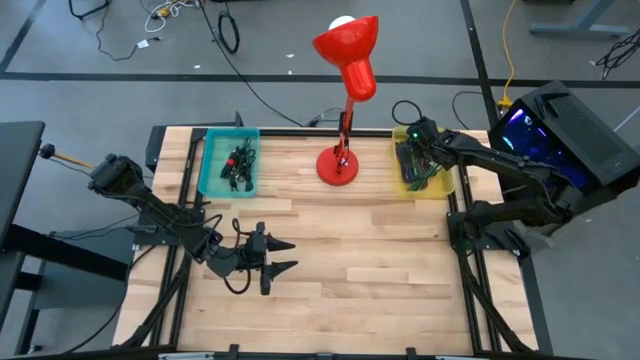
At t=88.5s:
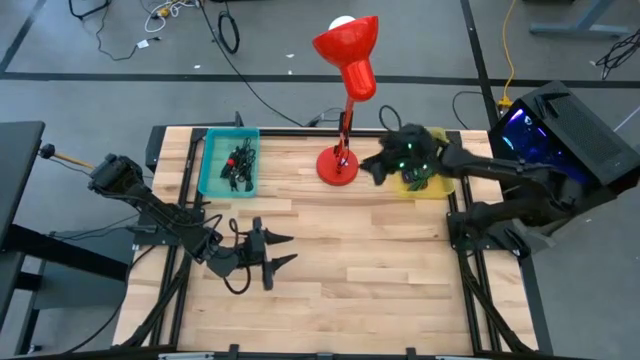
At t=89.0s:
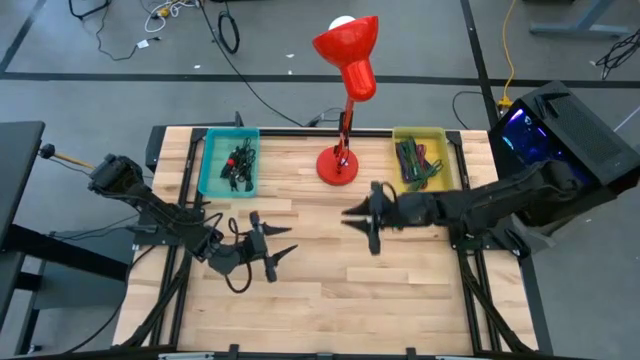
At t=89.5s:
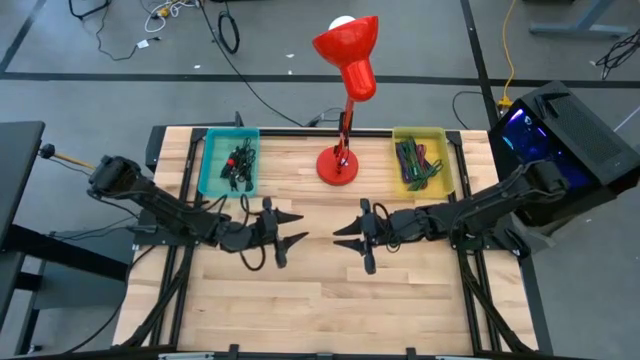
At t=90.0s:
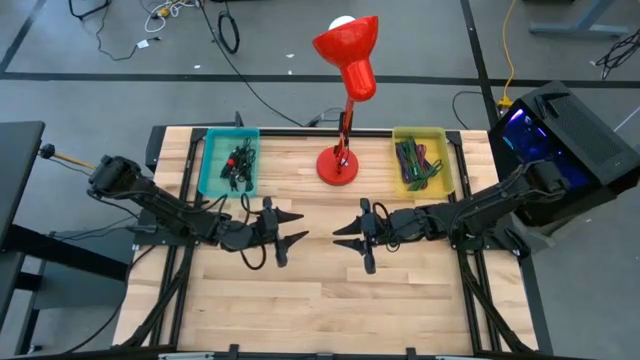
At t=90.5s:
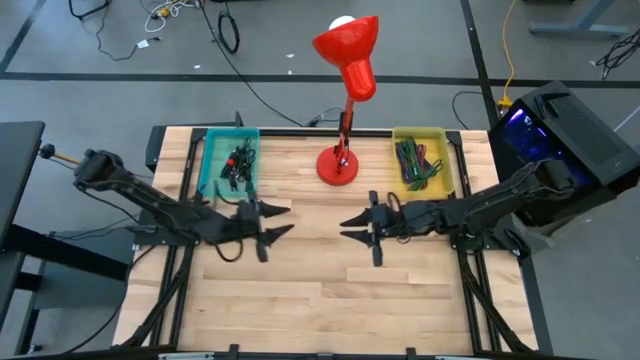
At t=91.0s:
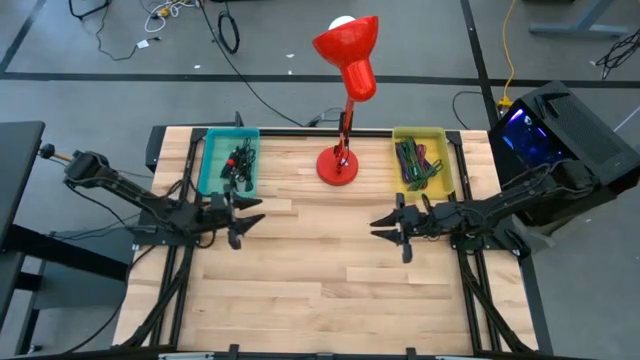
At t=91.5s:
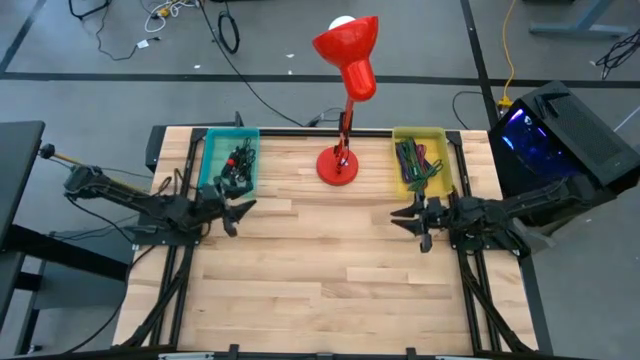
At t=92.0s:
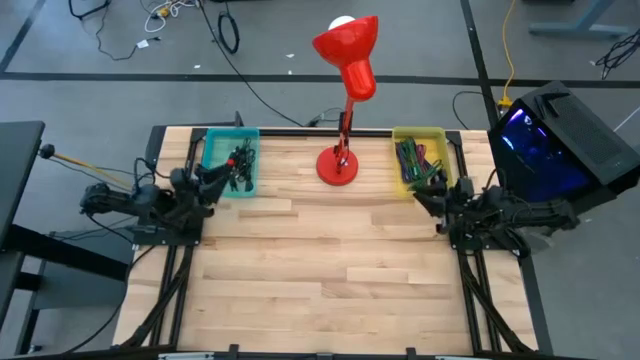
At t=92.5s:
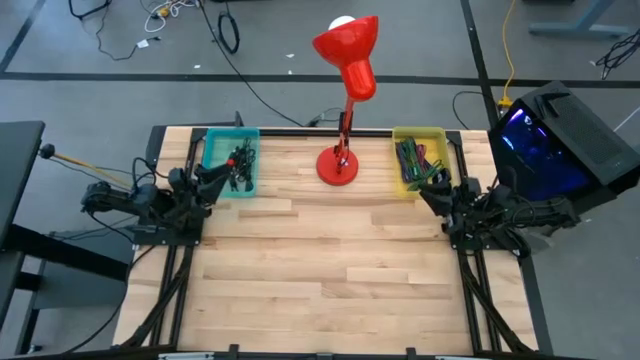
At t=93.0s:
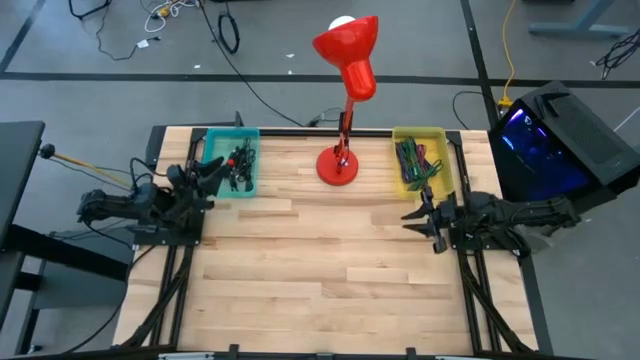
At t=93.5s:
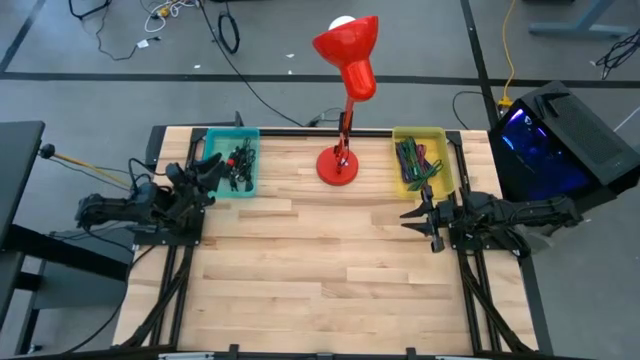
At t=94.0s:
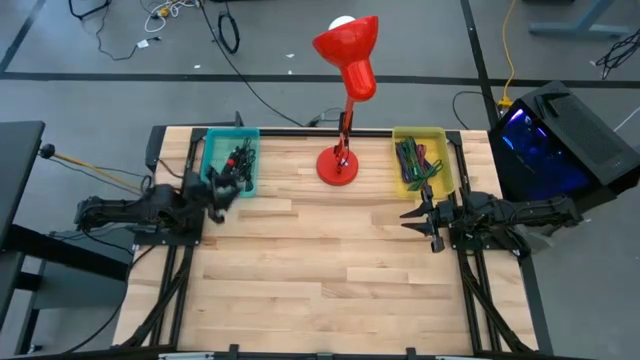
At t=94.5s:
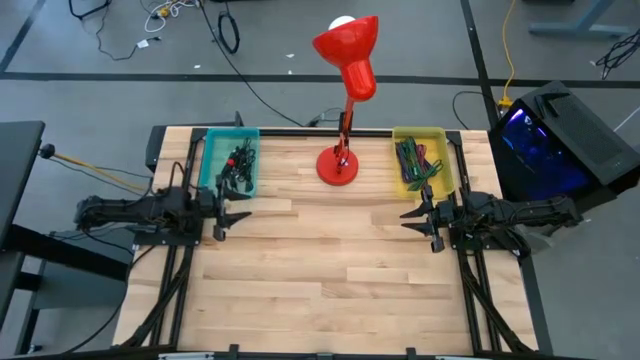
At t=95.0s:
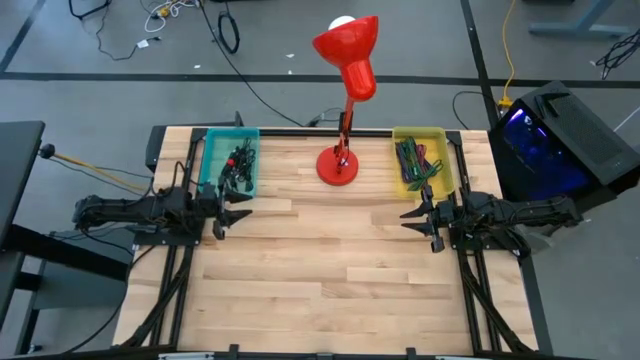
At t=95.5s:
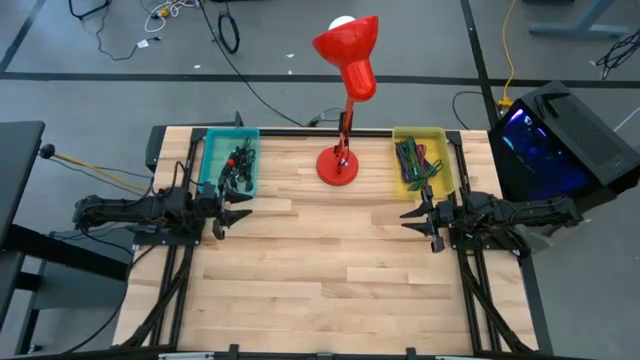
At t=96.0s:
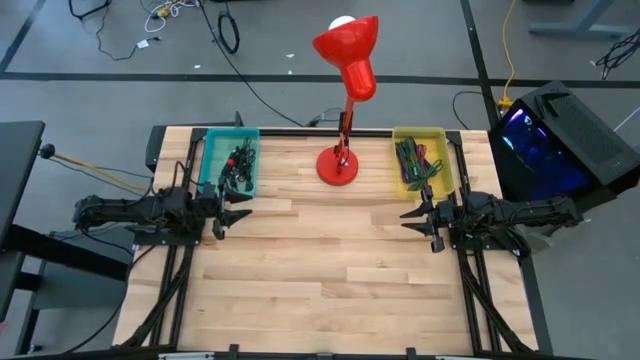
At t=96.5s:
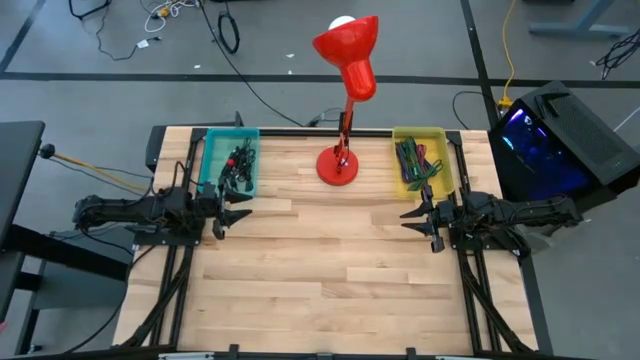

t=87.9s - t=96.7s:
Task: Pick & Place USB Port
Return to Home Position

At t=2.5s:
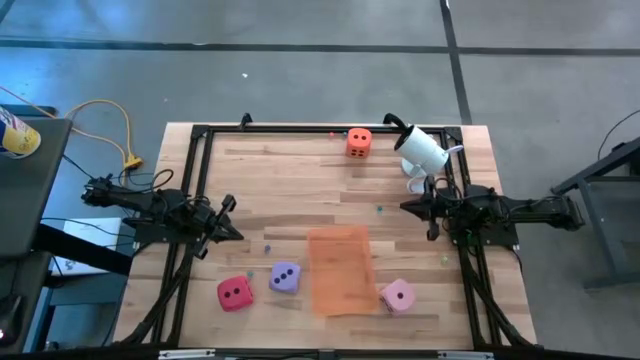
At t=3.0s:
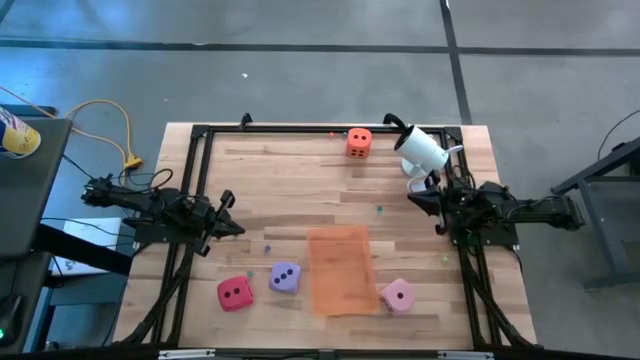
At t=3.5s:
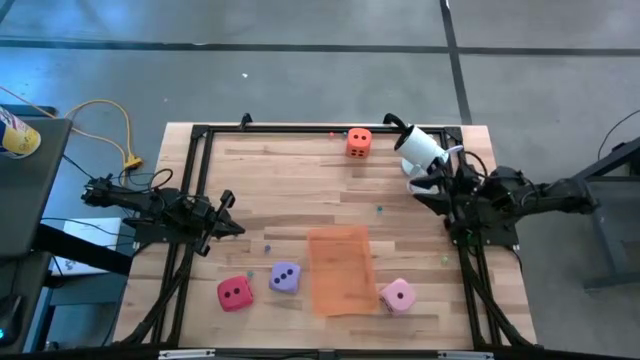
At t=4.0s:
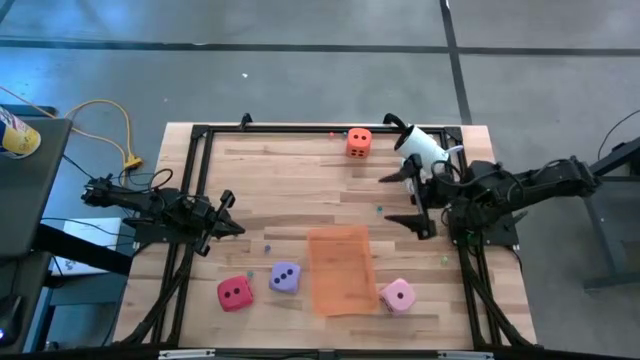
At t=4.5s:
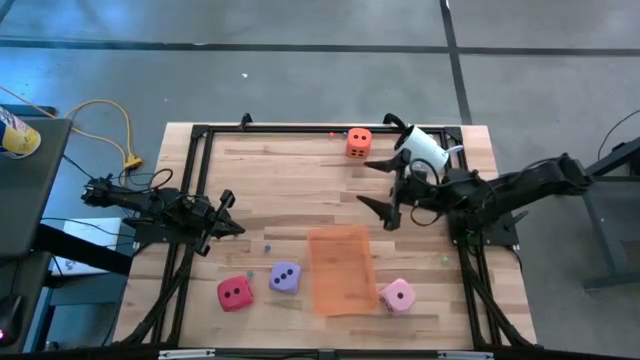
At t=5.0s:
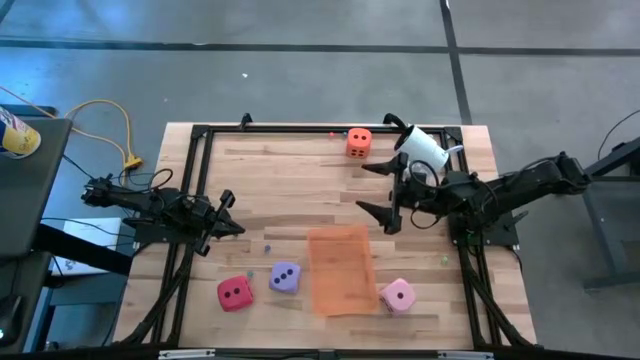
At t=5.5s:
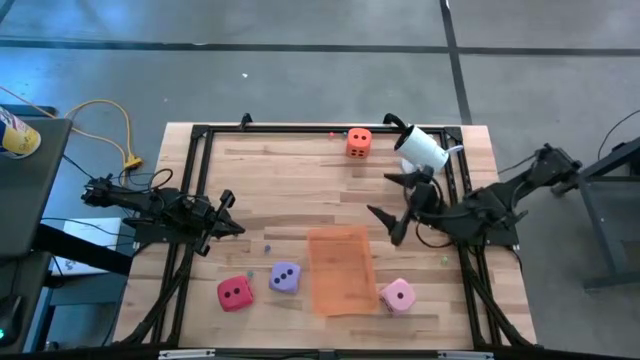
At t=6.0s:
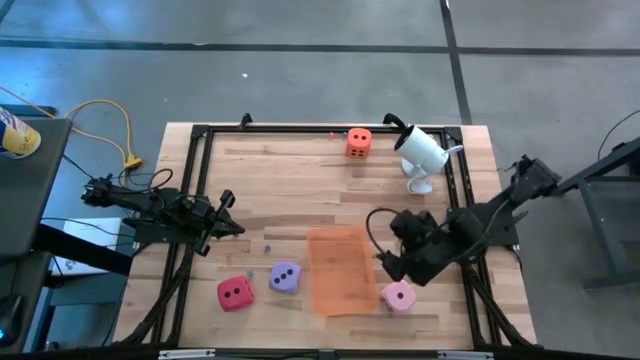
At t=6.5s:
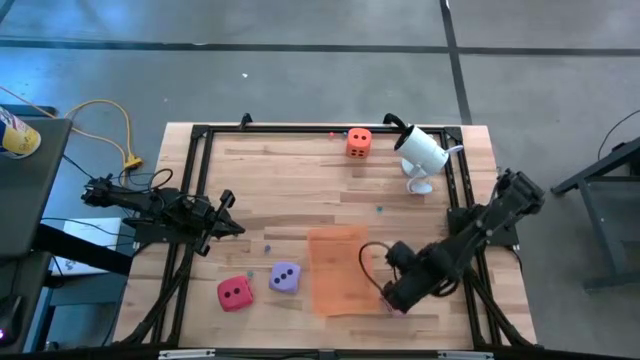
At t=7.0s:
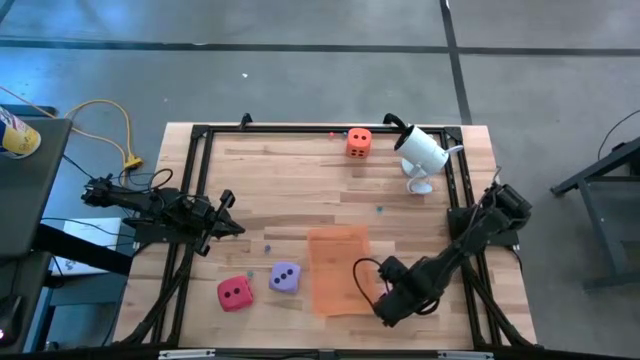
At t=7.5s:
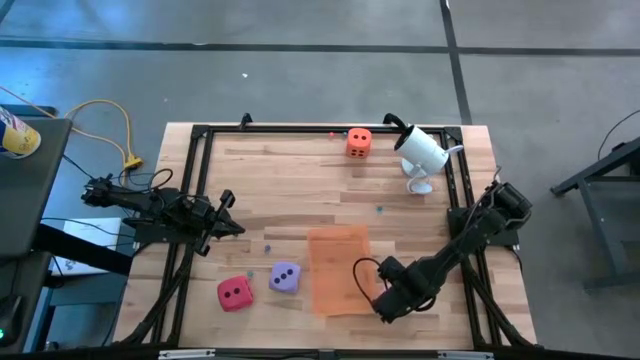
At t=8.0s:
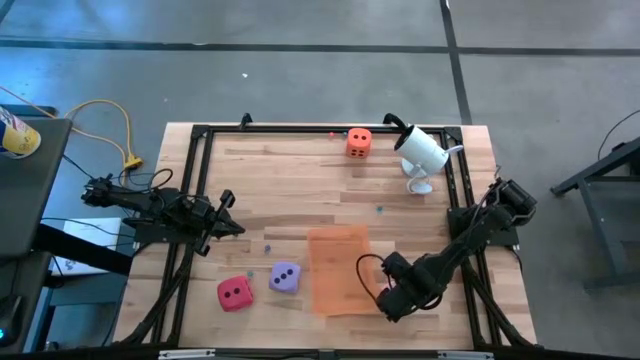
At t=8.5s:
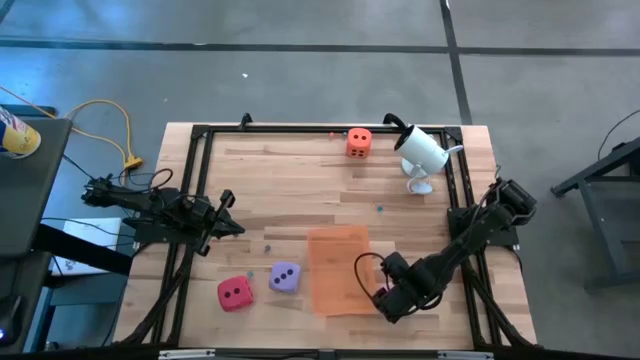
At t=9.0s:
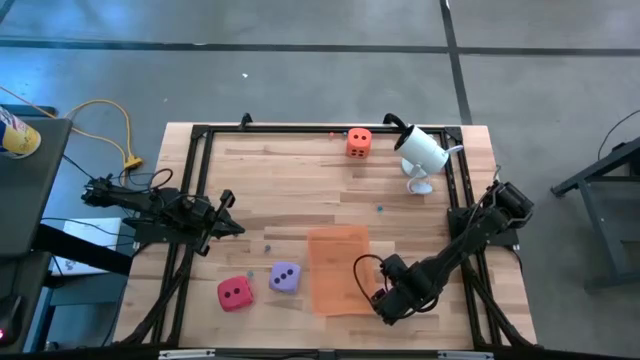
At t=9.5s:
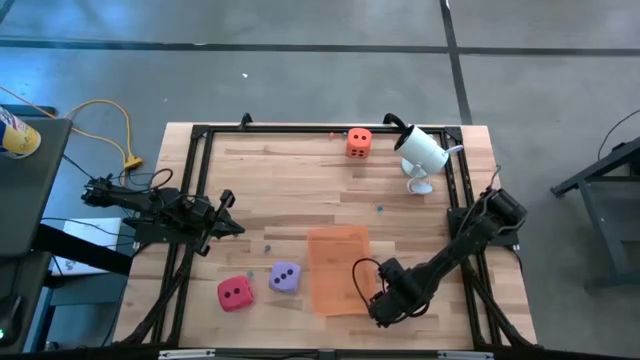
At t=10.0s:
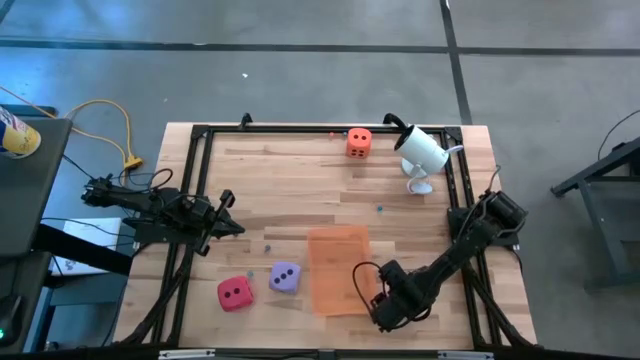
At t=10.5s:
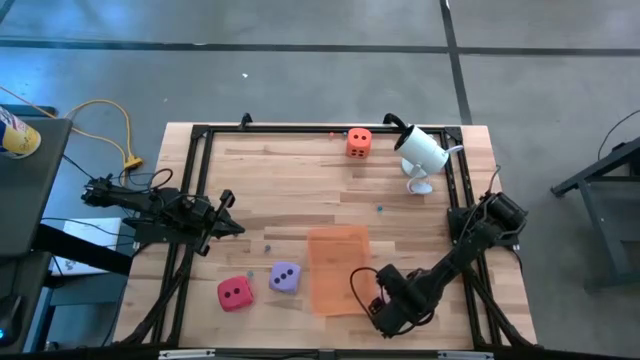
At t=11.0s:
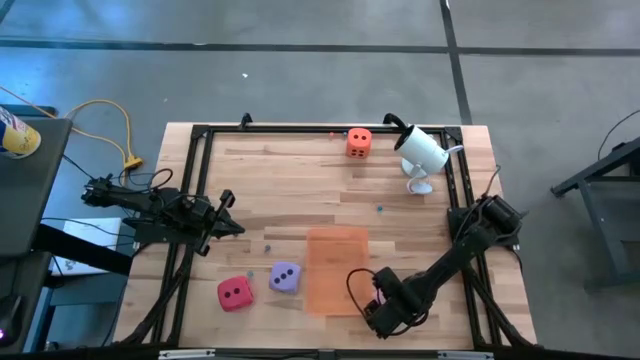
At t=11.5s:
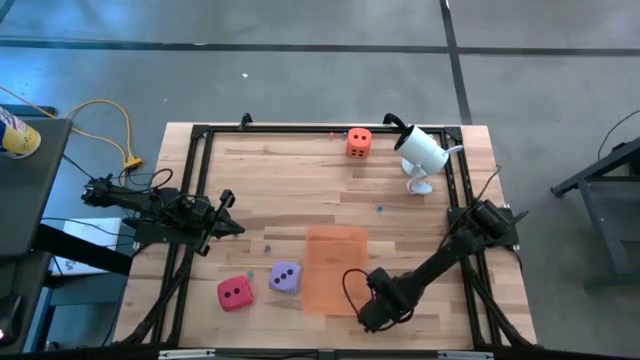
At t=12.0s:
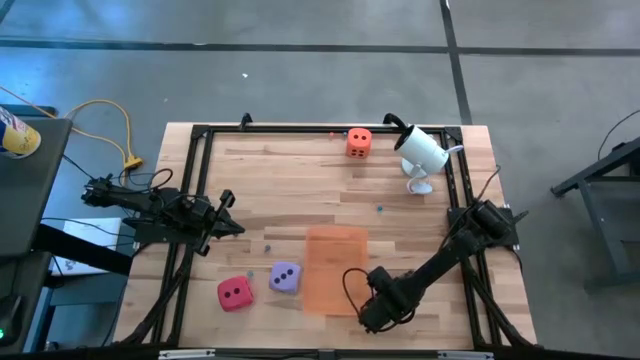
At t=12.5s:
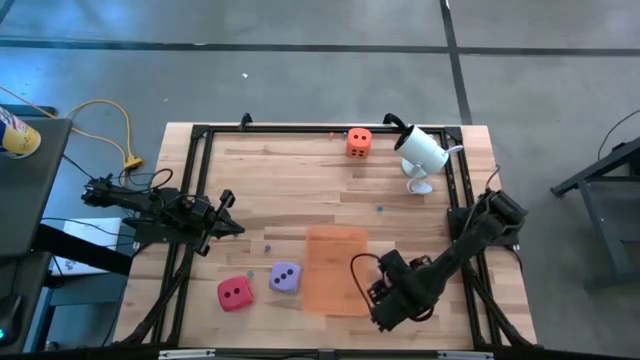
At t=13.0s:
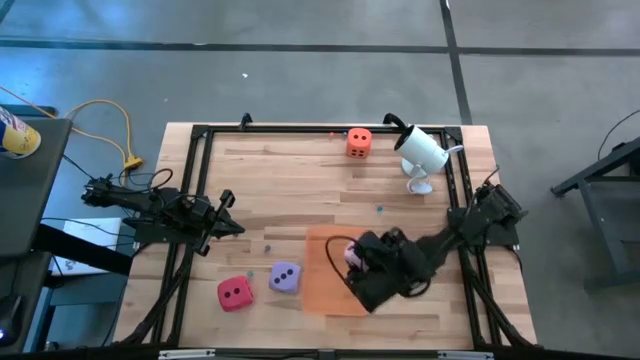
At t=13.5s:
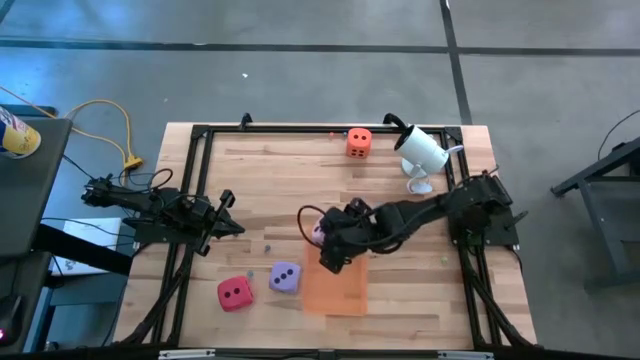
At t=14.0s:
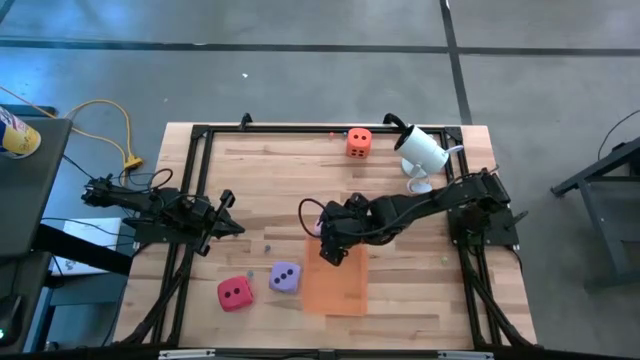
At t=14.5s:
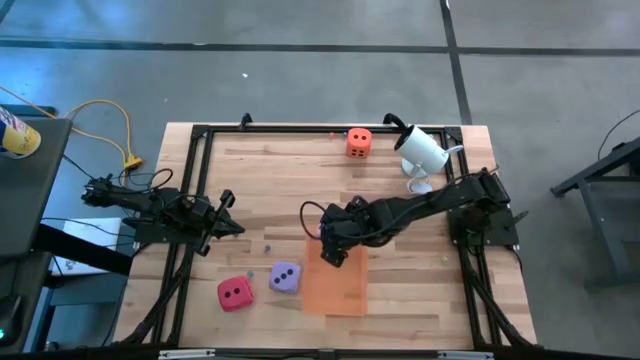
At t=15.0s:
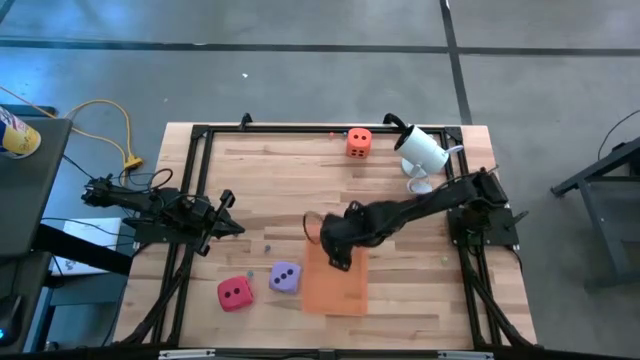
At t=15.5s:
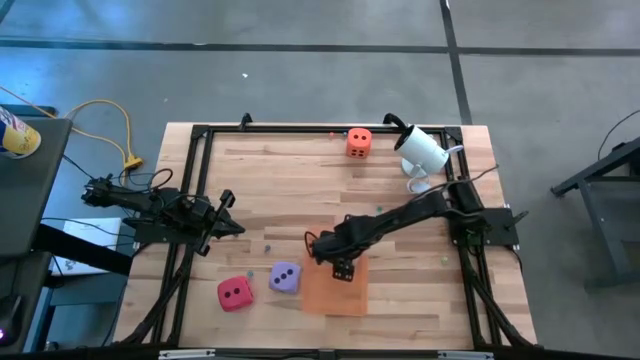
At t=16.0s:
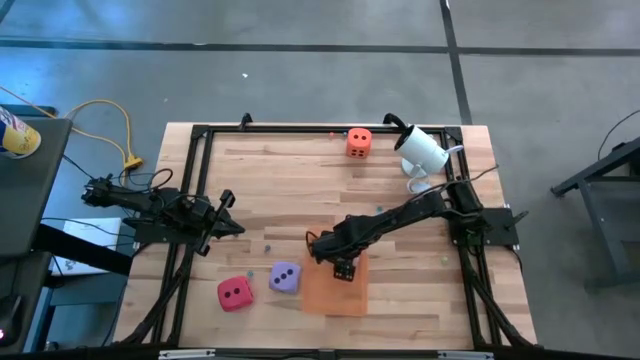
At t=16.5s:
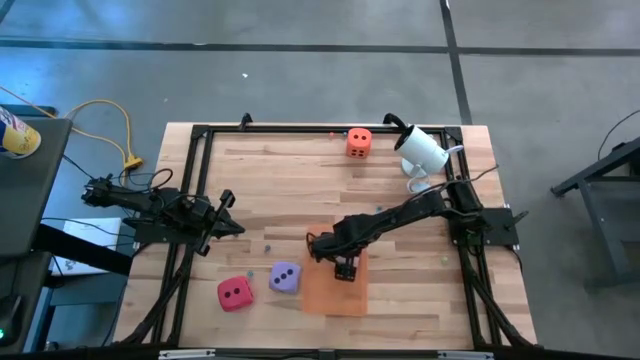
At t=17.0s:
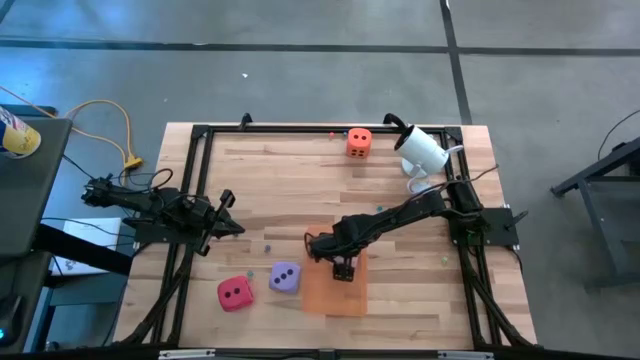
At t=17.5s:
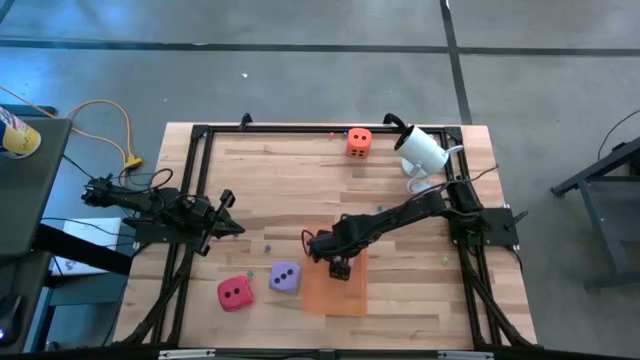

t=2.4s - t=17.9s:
Task: Pick & Place Dice
Put the large pink dice into the orange bin
